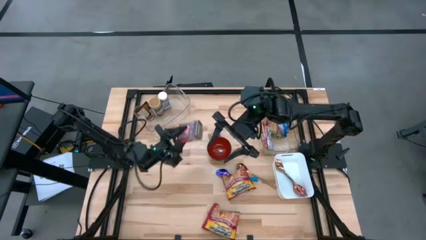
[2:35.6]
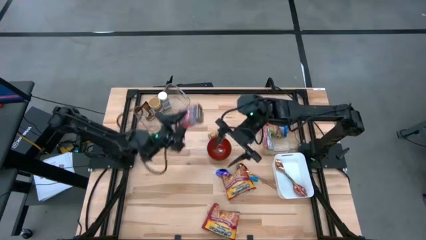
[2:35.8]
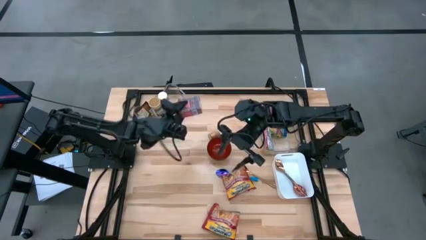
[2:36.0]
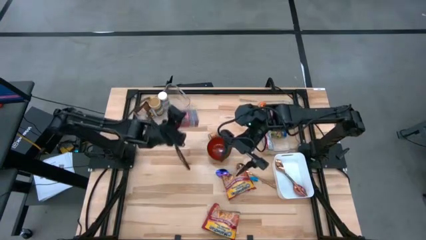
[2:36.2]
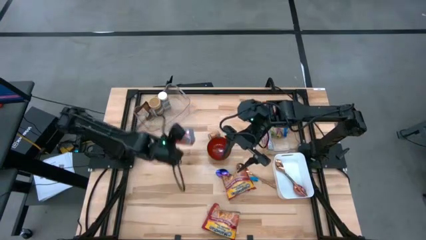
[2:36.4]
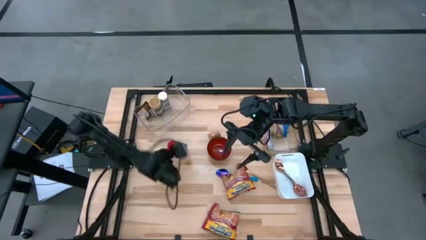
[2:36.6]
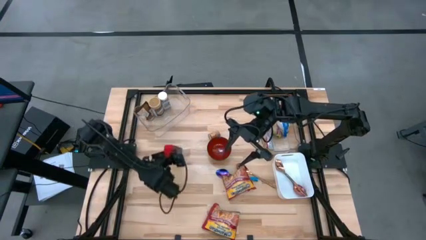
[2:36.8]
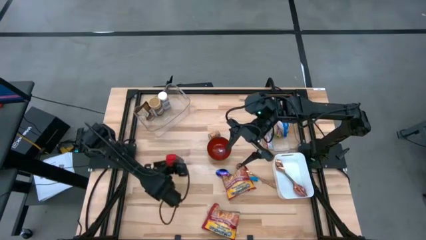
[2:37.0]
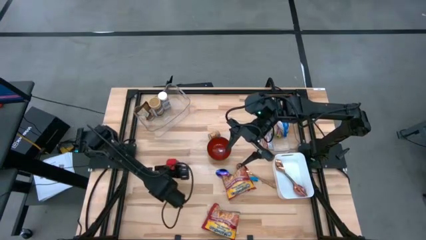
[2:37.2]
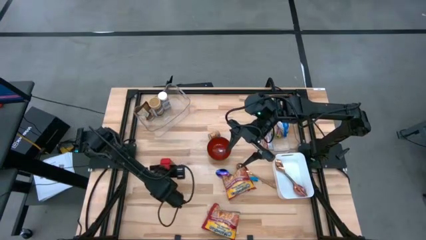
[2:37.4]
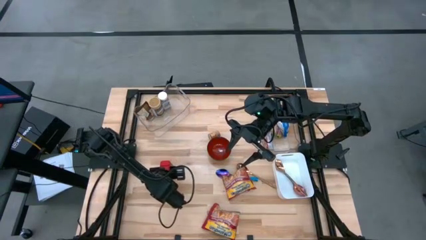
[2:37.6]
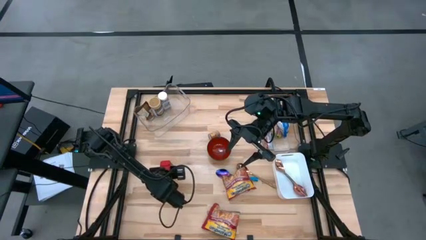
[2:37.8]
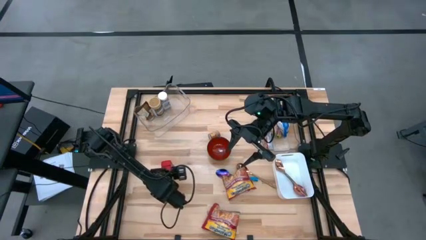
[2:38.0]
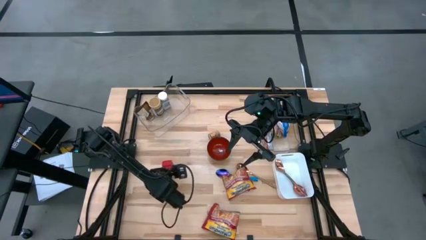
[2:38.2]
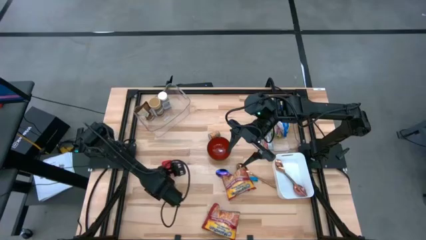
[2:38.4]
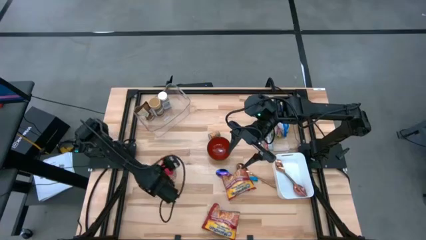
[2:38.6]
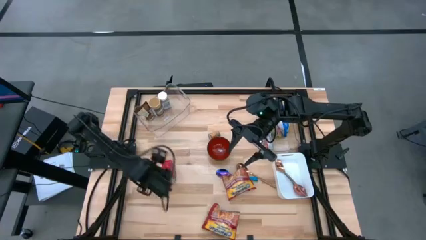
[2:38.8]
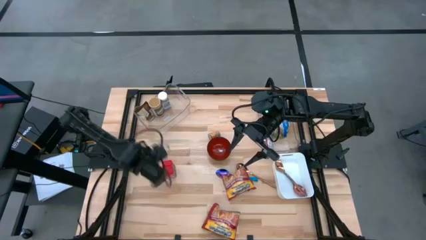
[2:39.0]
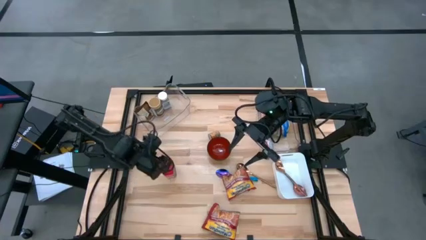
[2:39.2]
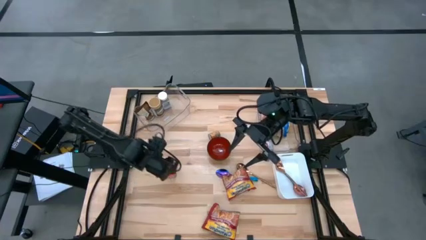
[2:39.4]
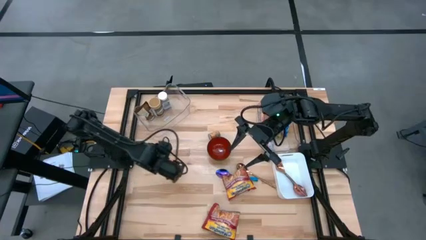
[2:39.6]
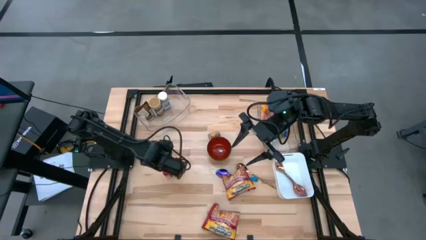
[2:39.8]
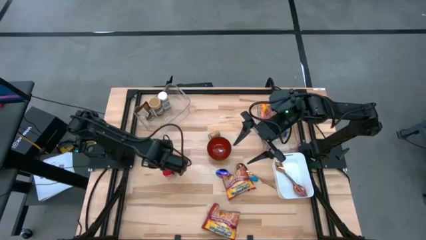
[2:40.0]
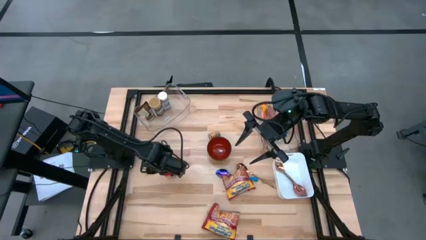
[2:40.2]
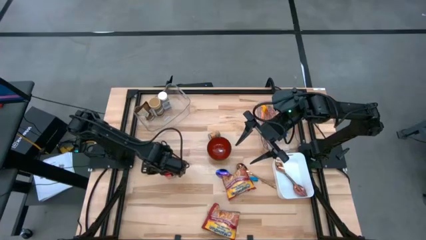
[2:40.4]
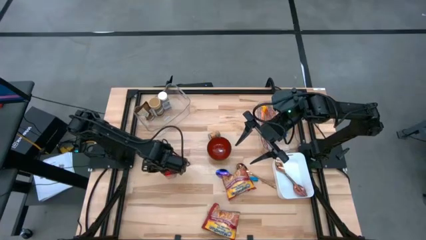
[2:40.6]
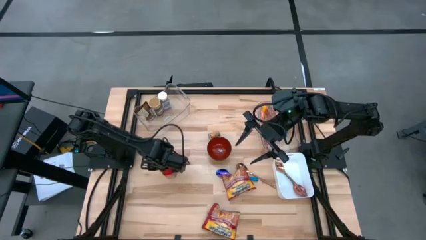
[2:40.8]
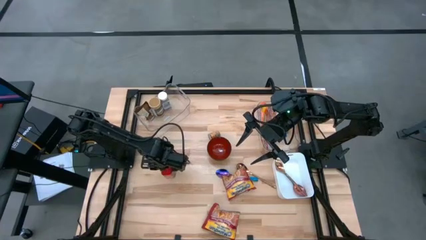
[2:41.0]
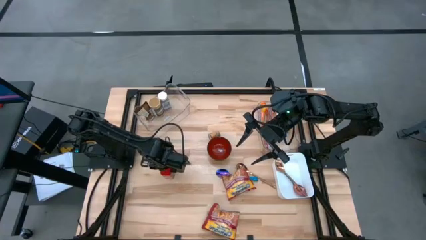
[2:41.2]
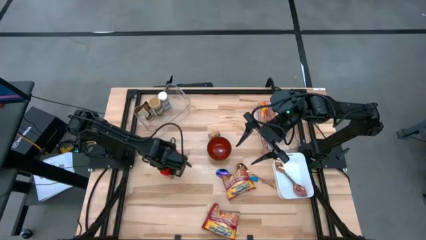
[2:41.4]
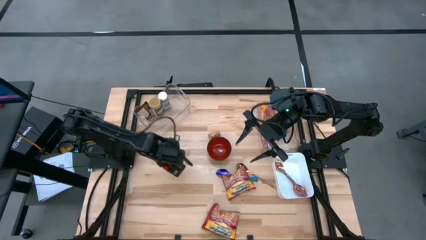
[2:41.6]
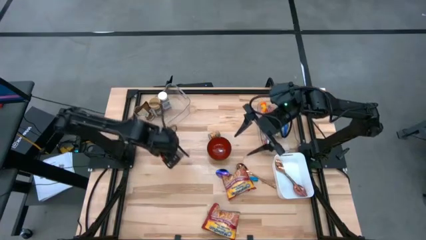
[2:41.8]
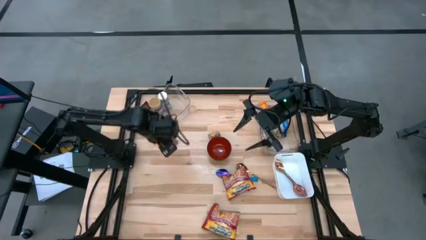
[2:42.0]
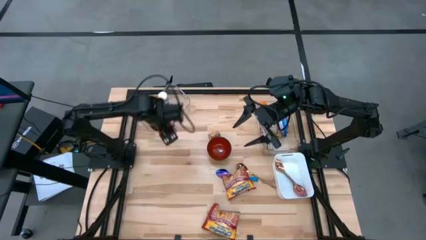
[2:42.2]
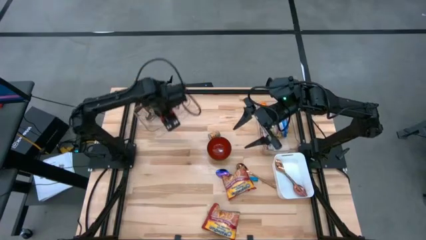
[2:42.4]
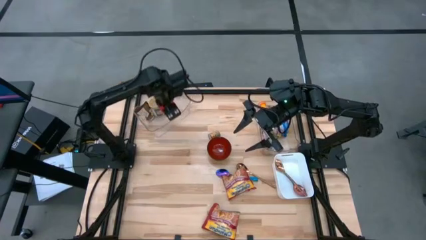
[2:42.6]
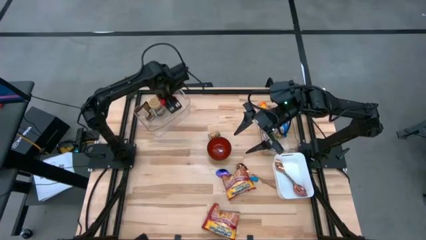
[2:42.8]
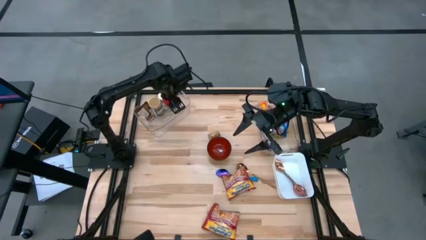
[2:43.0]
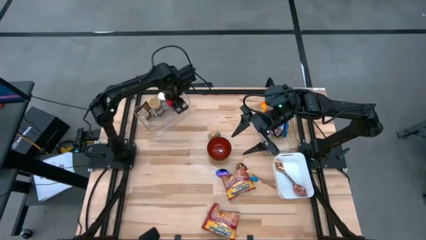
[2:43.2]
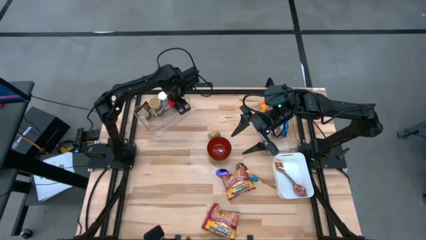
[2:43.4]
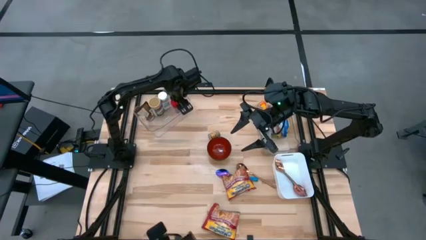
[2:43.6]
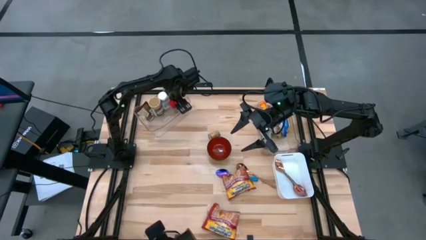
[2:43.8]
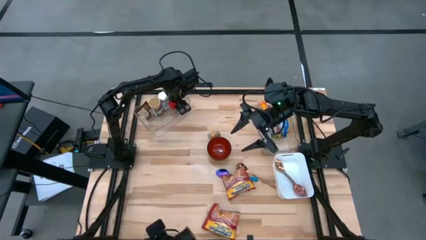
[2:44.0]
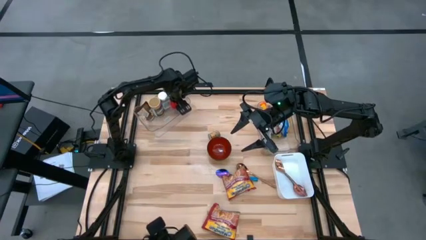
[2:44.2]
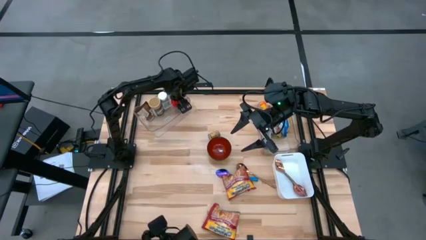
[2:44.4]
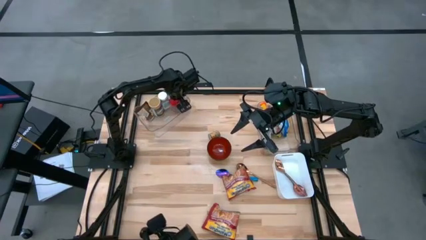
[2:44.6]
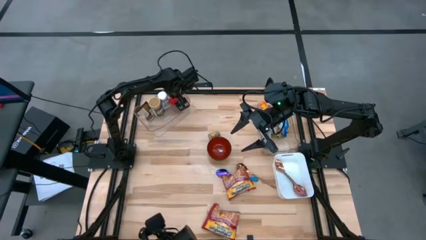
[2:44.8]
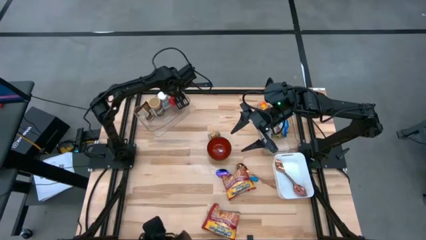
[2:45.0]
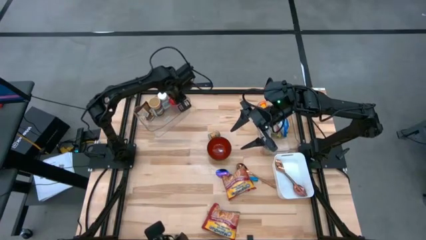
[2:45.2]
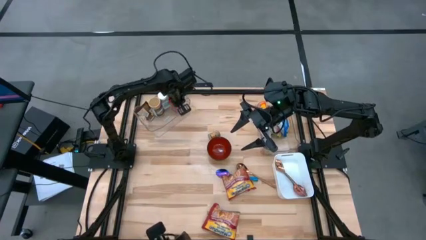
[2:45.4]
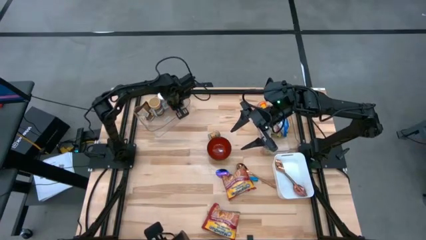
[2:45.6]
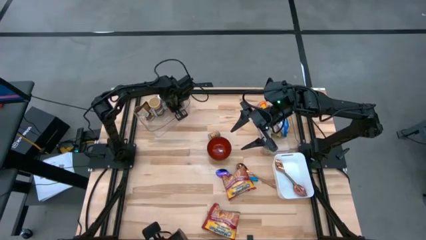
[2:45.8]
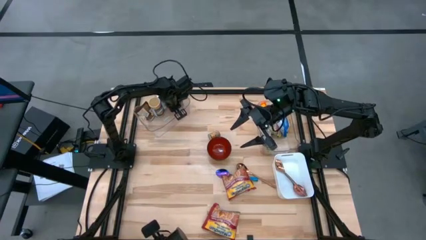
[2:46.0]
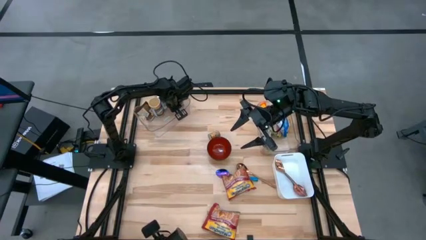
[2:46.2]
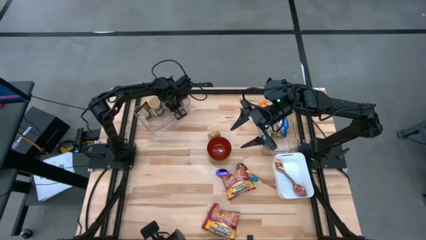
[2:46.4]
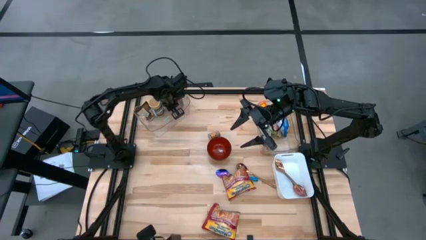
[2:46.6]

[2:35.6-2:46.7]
Task: Pick & Place Food Item
Put the red seasoning can into the left transparent bin

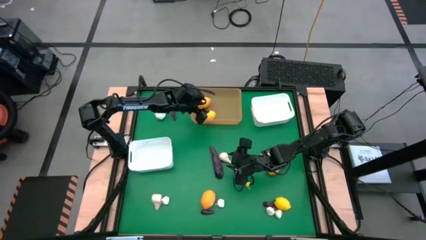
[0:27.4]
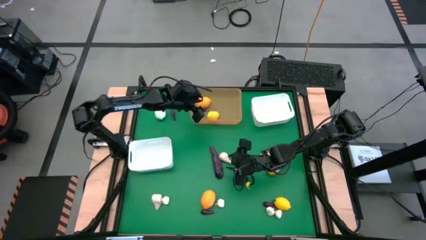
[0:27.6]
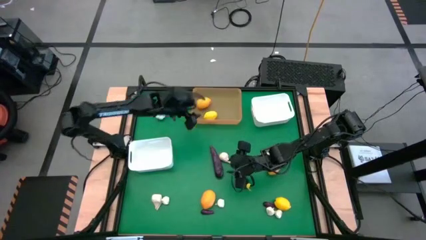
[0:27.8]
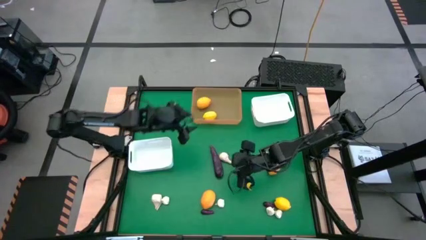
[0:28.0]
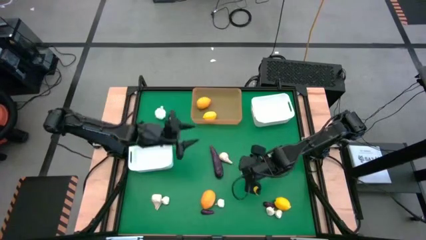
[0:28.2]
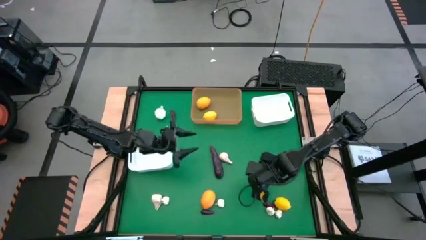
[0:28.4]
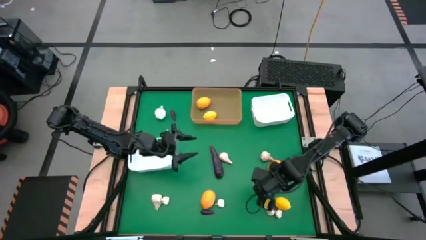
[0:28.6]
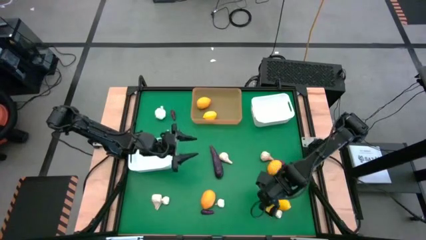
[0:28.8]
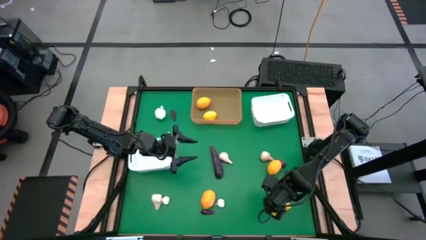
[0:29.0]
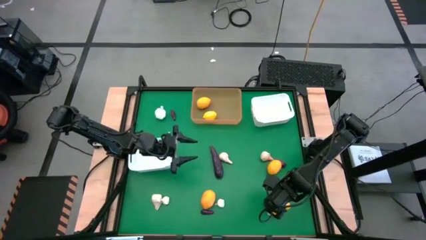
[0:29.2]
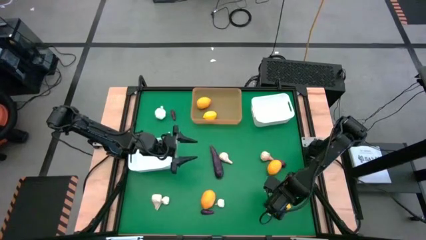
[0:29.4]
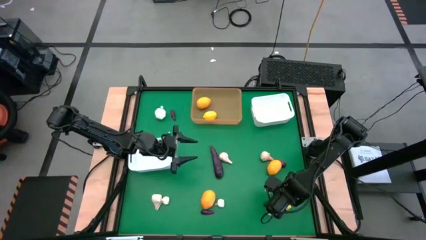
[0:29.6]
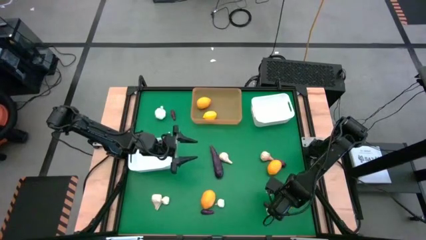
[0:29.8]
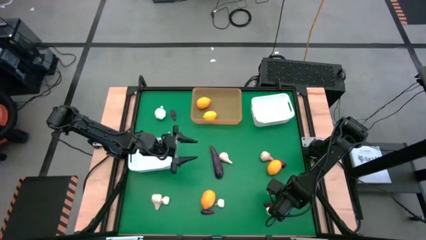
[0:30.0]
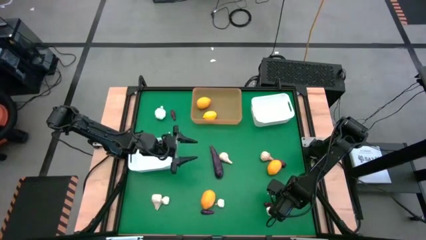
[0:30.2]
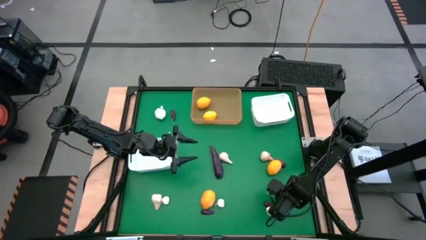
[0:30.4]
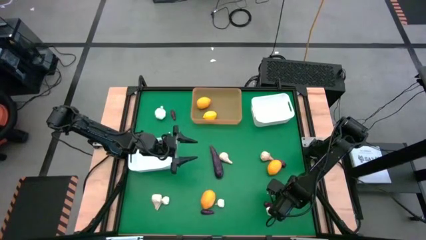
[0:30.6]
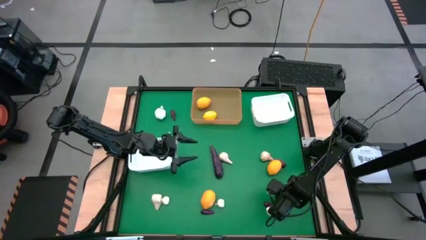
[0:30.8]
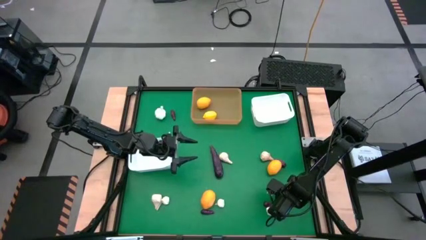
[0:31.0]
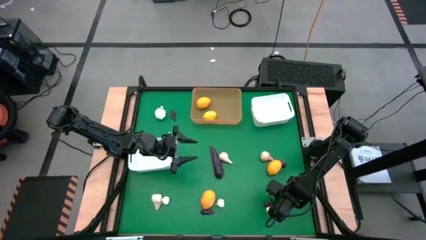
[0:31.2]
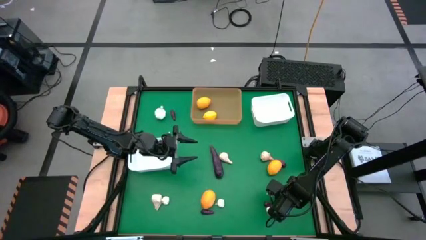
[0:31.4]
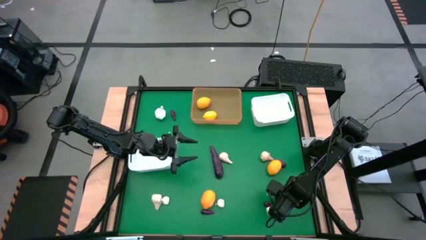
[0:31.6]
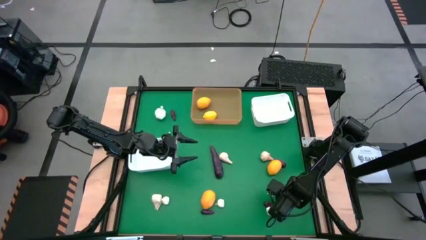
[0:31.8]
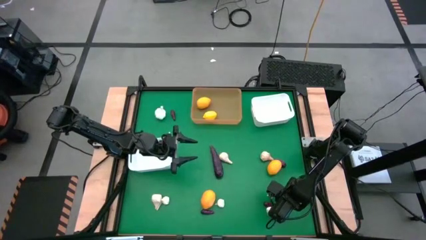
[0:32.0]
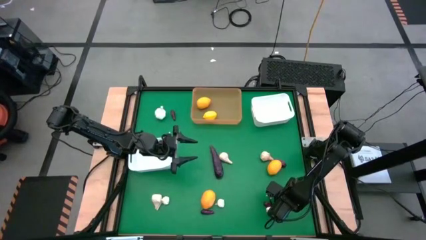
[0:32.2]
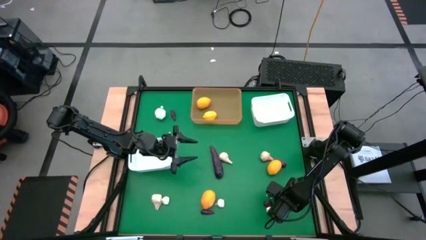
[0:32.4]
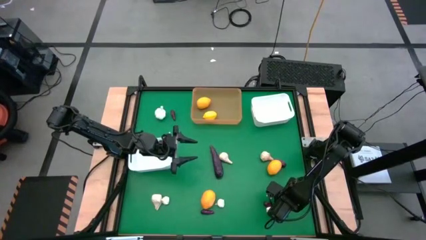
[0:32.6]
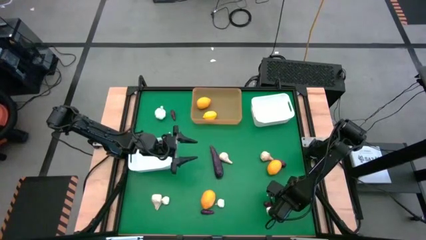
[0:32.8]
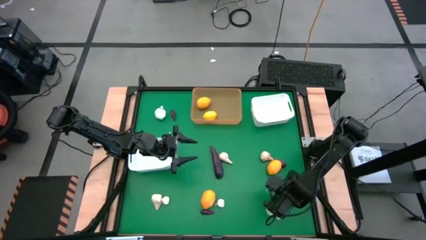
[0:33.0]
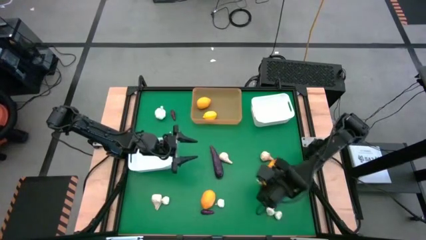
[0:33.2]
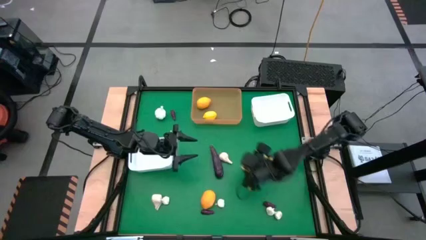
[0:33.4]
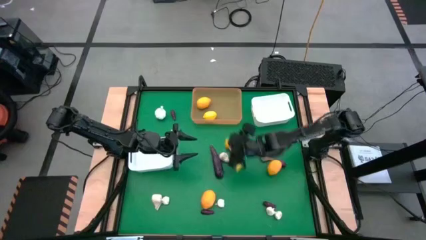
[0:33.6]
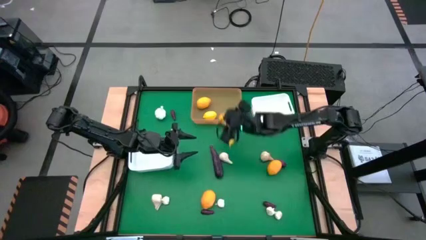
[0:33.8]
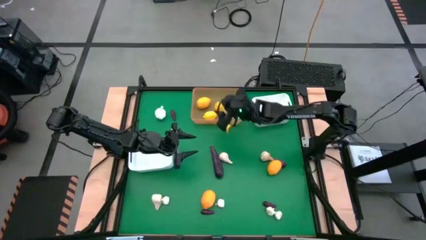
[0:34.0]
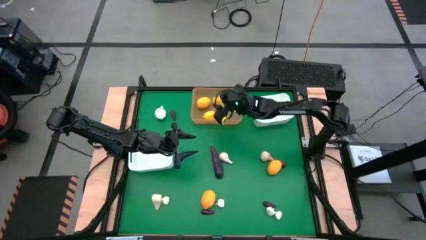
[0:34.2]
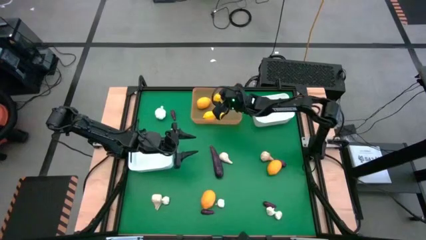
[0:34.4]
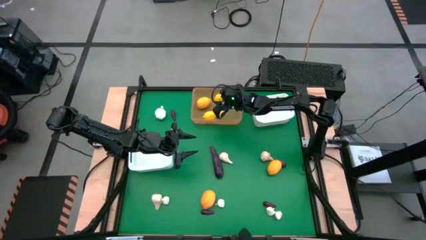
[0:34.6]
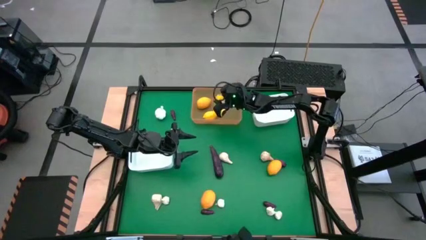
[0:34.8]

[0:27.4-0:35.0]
Task: Sort produce into baskets
Put the lemon into the yellow bin
